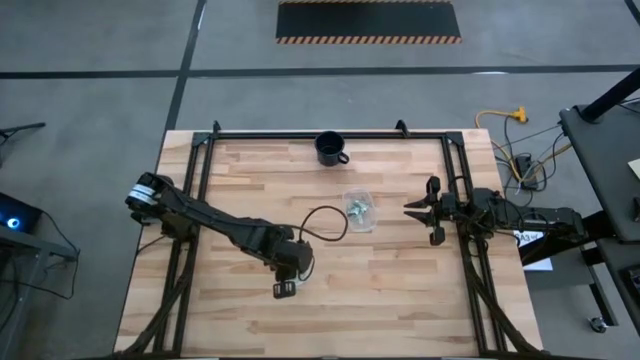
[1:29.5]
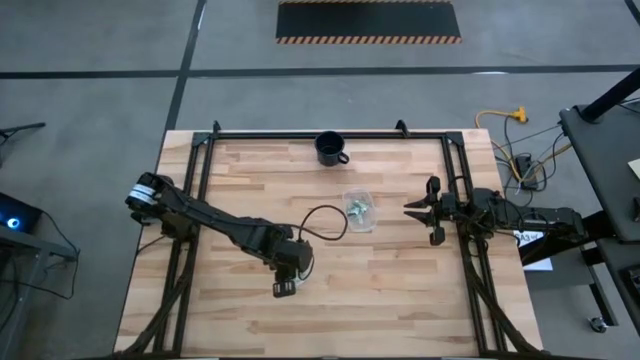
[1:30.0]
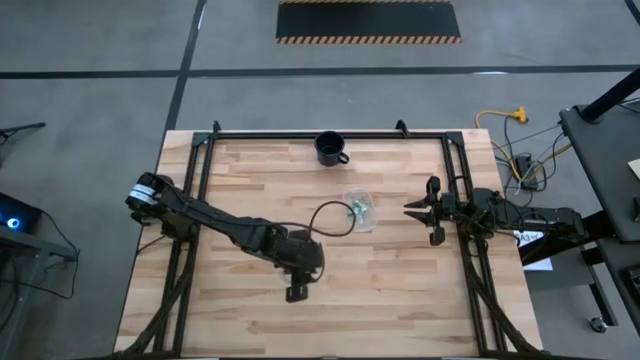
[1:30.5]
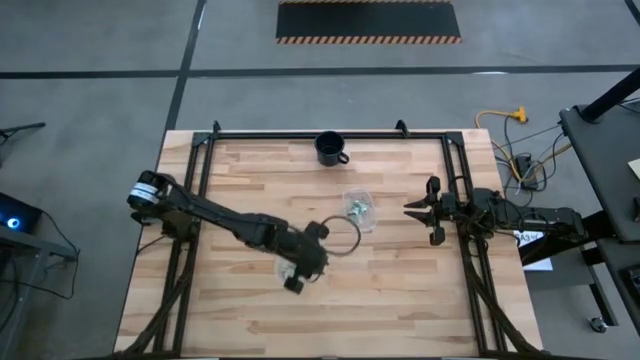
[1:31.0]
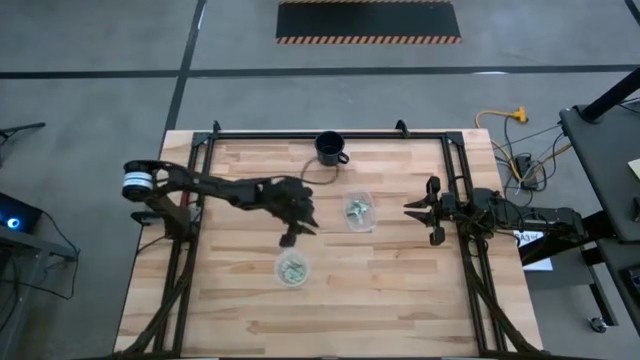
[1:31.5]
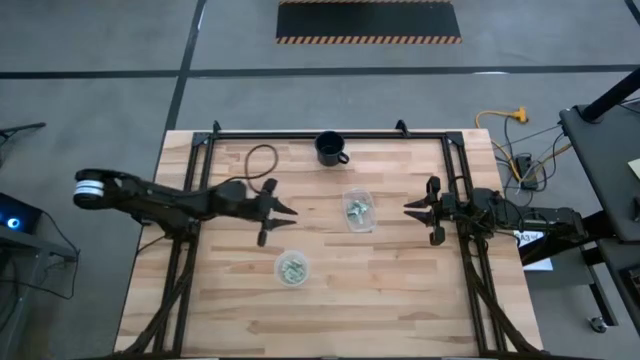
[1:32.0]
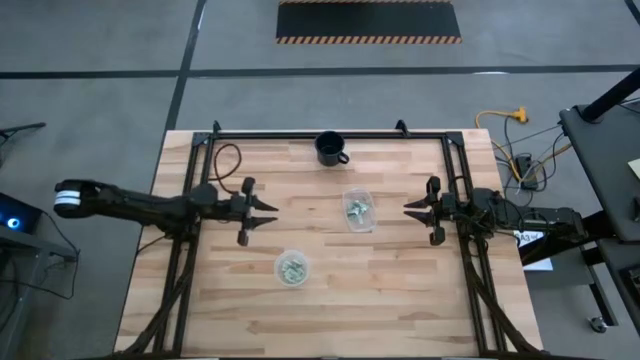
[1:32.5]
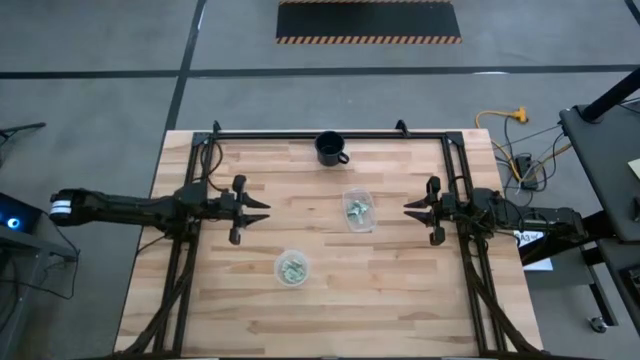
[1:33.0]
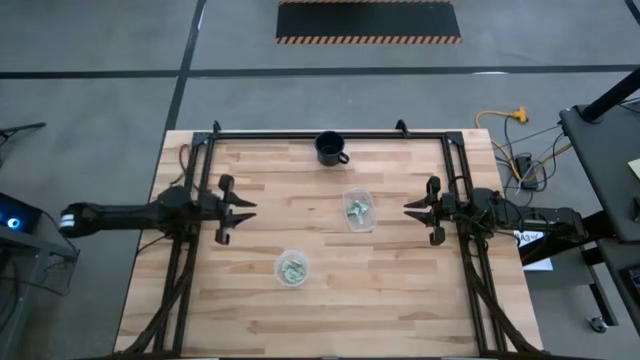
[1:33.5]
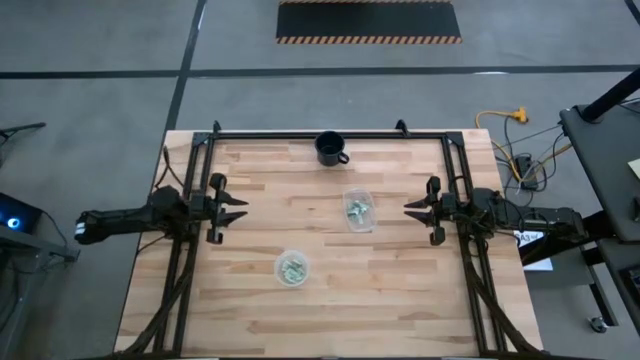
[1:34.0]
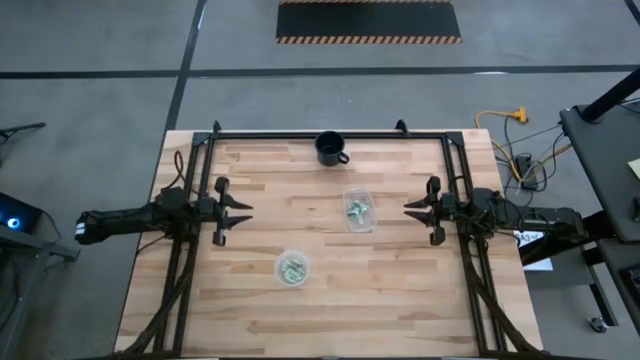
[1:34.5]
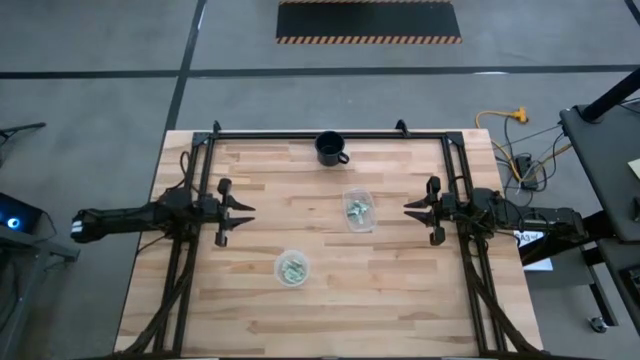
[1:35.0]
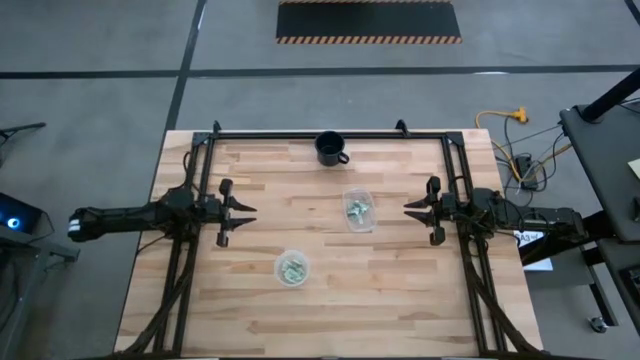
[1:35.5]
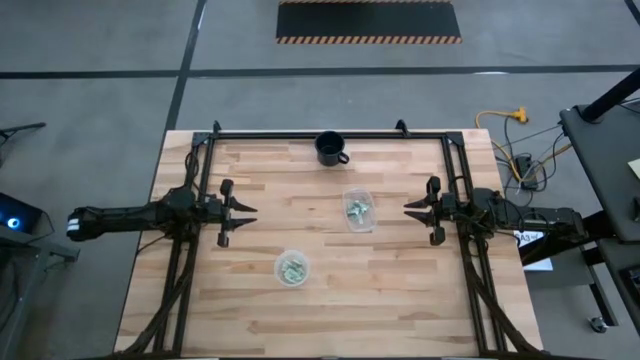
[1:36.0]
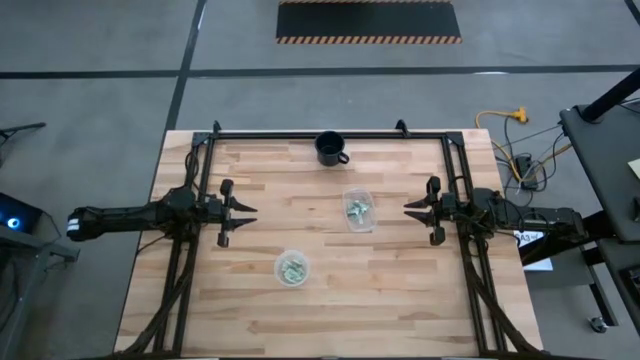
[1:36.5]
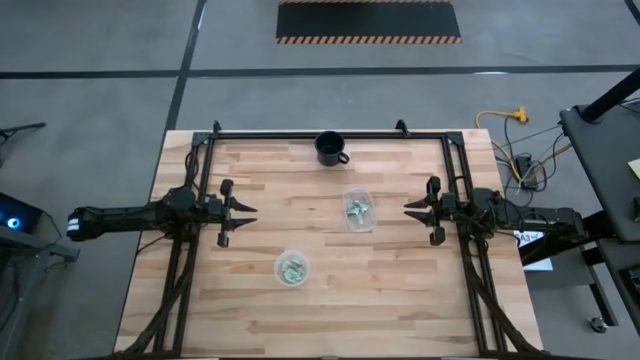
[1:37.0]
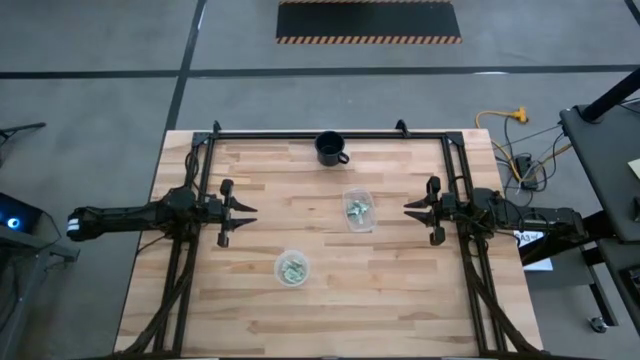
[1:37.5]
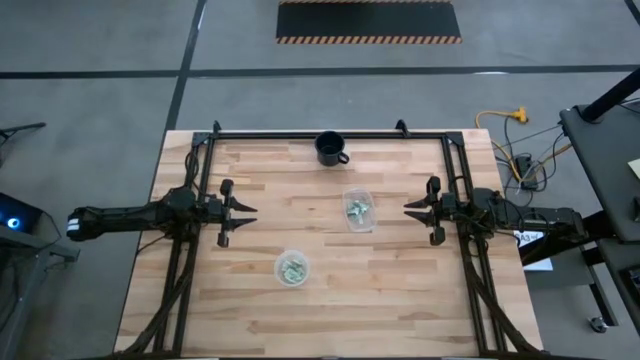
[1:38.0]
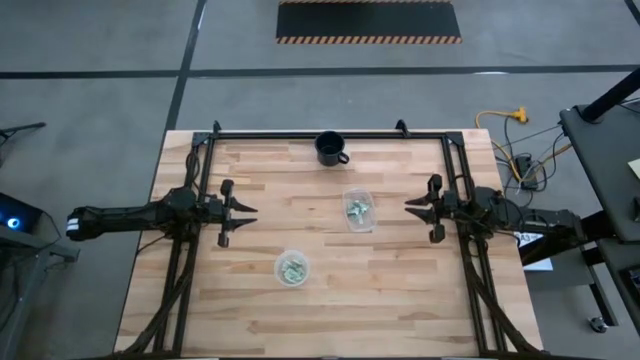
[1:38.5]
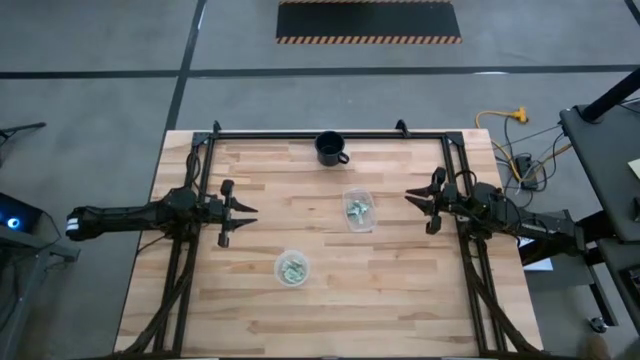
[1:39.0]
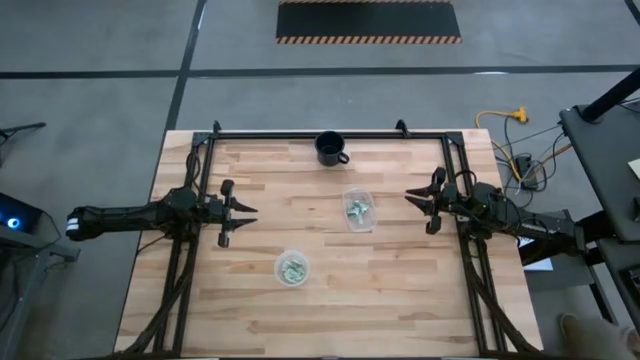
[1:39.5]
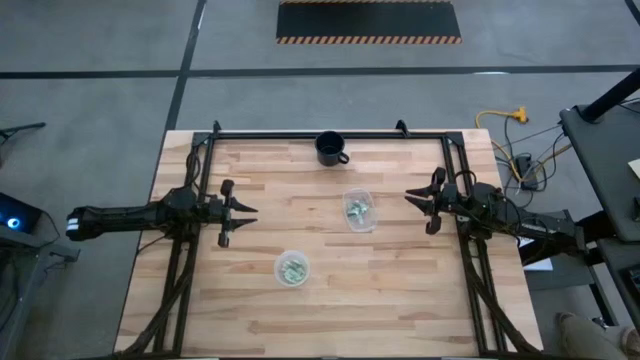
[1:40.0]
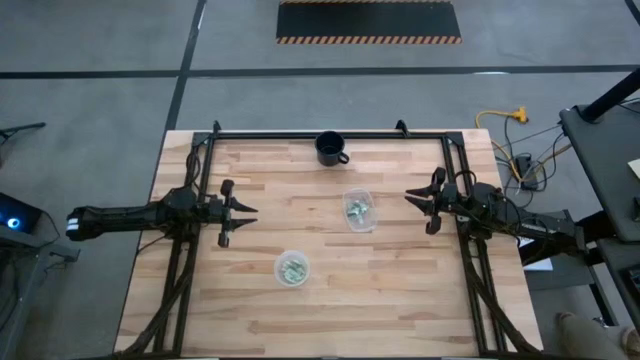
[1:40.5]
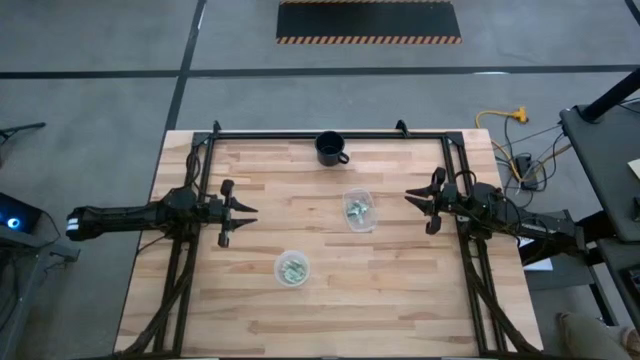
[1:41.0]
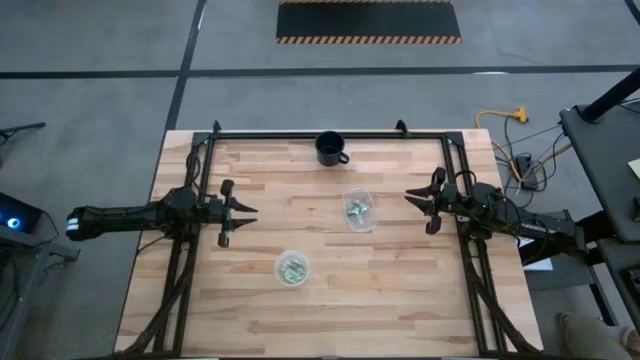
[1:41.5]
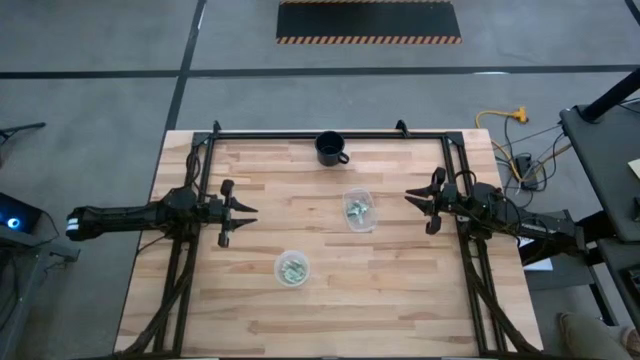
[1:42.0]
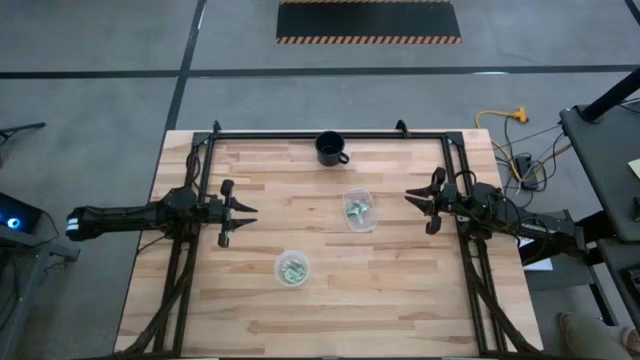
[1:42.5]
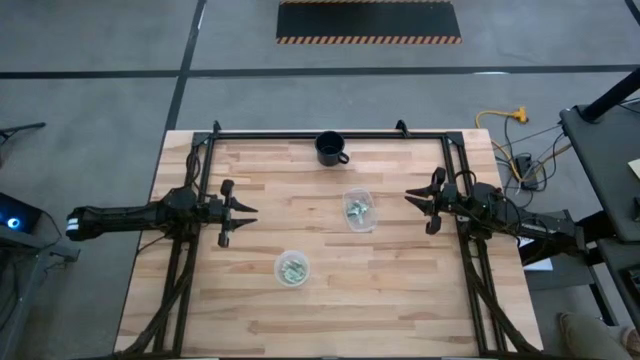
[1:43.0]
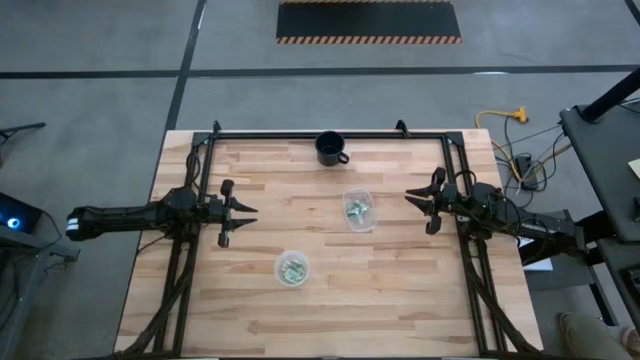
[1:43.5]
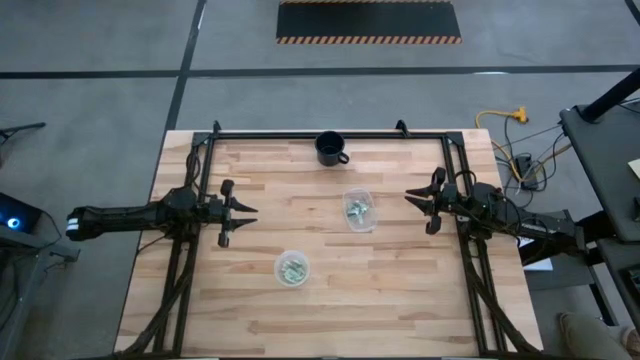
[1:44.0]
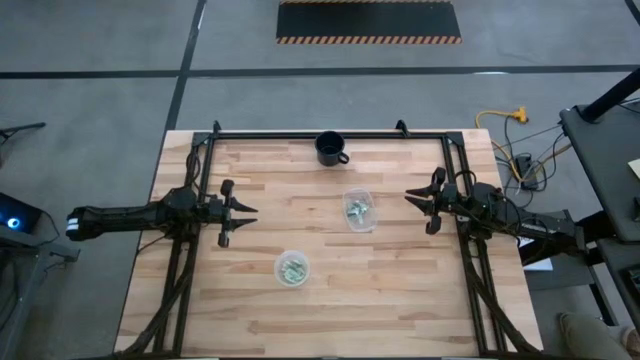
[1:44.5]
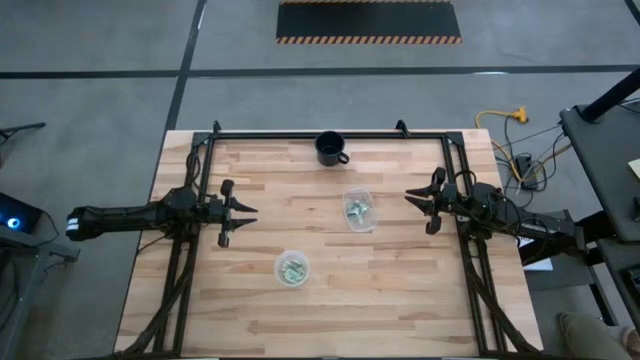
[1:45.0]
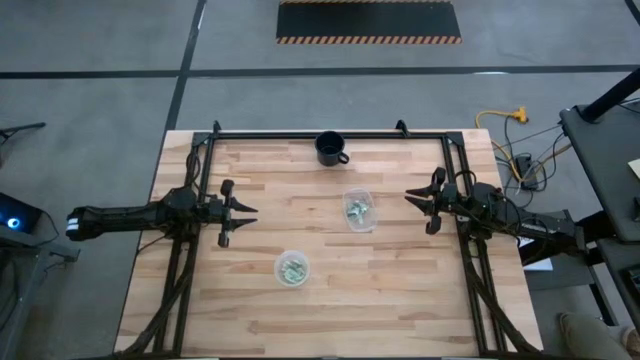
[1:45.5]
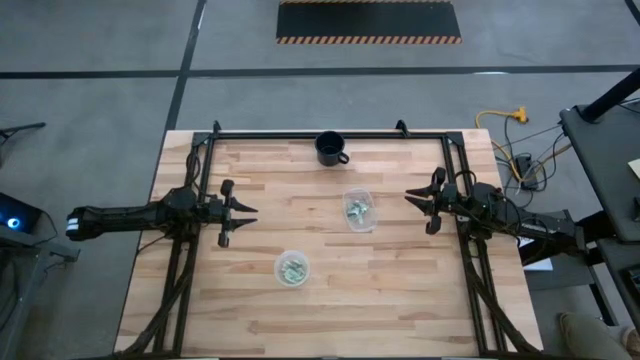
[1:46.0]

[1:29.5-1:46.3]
Task: Pick and place items into bin
Return to Home Position
